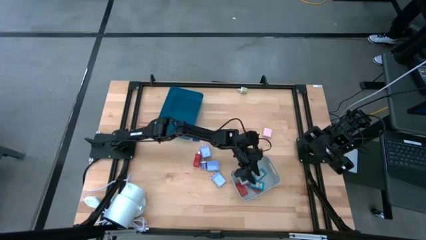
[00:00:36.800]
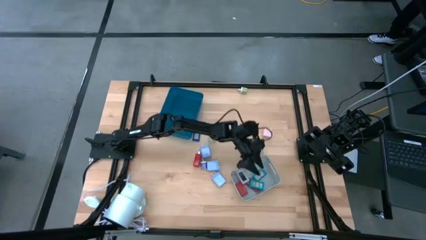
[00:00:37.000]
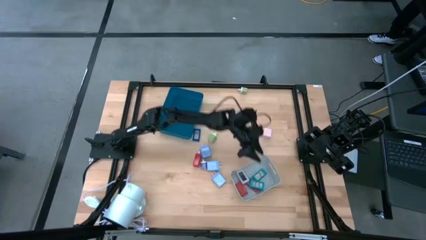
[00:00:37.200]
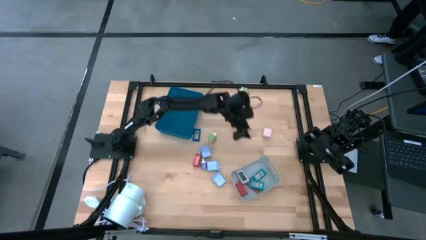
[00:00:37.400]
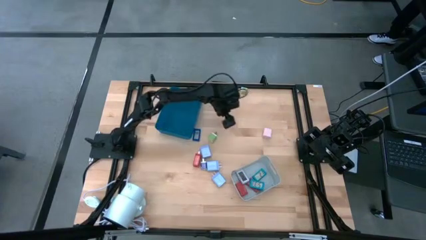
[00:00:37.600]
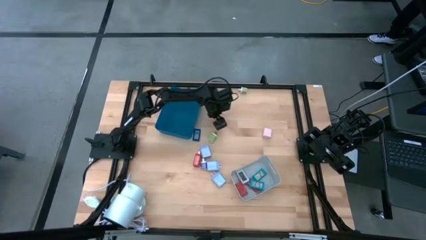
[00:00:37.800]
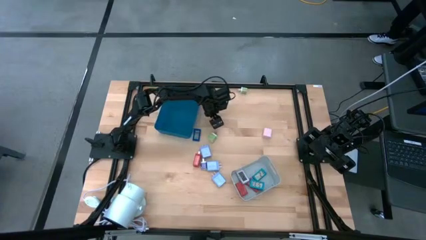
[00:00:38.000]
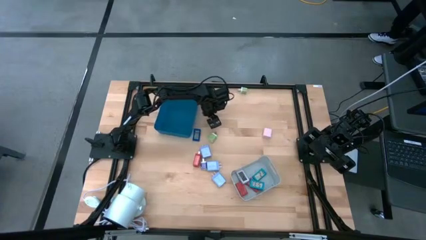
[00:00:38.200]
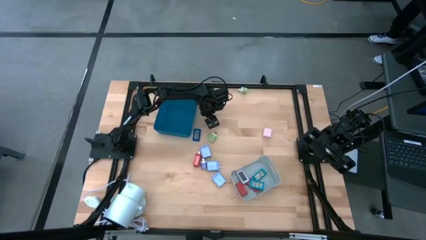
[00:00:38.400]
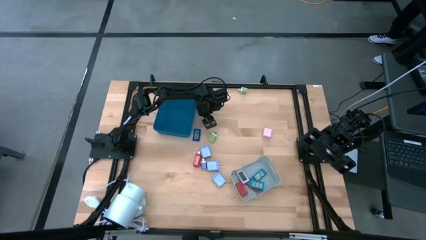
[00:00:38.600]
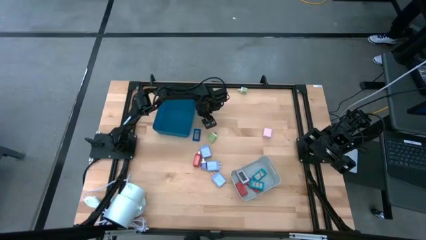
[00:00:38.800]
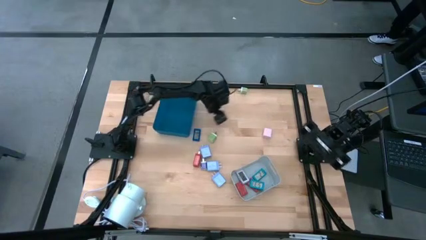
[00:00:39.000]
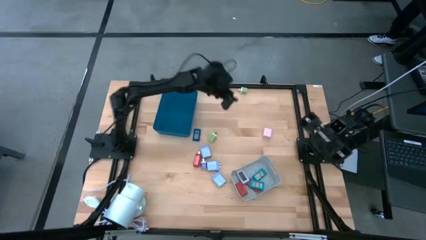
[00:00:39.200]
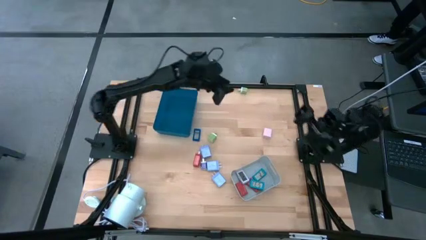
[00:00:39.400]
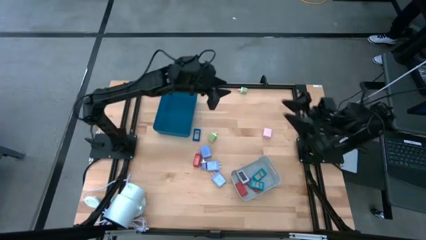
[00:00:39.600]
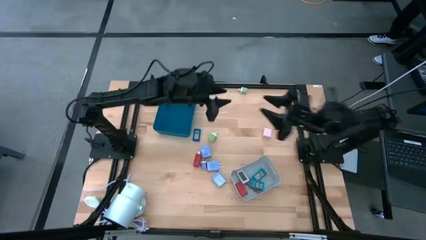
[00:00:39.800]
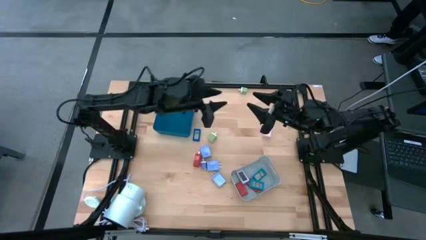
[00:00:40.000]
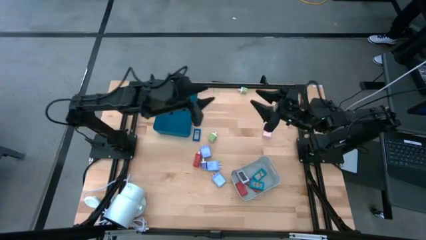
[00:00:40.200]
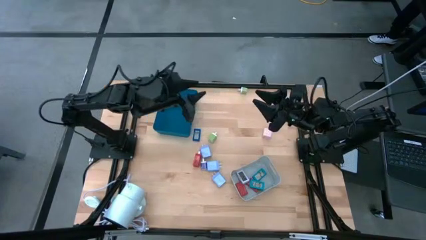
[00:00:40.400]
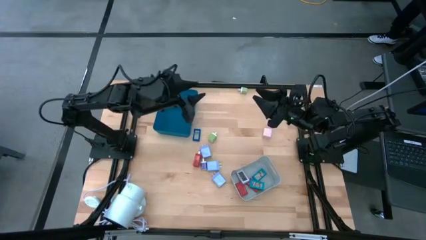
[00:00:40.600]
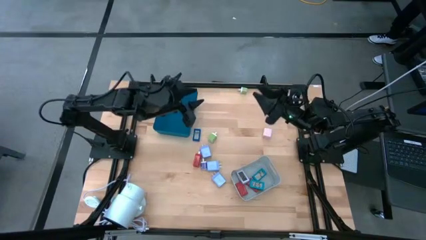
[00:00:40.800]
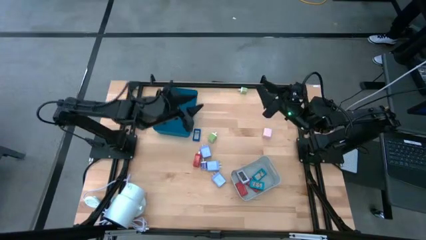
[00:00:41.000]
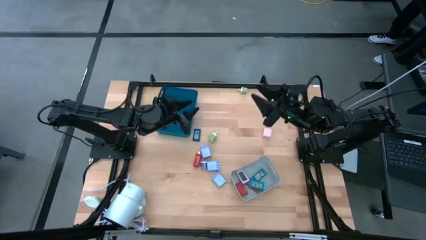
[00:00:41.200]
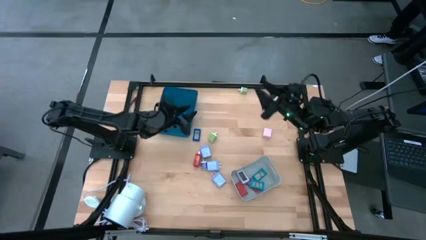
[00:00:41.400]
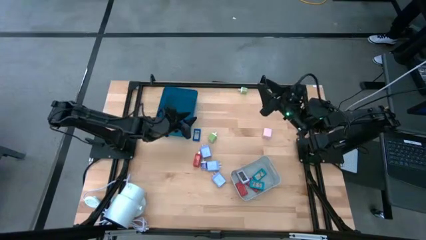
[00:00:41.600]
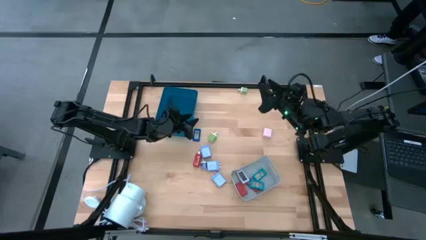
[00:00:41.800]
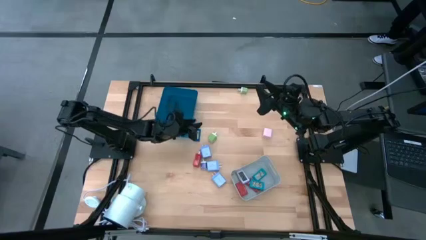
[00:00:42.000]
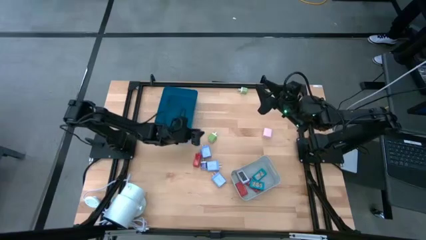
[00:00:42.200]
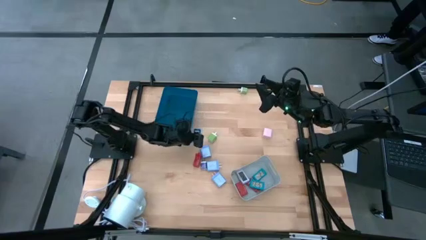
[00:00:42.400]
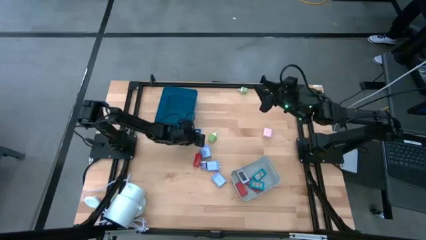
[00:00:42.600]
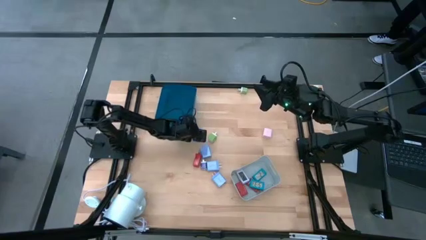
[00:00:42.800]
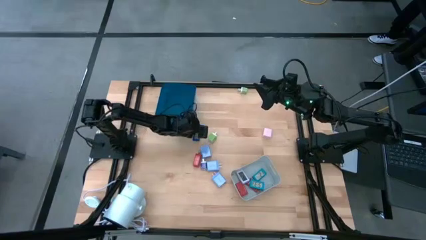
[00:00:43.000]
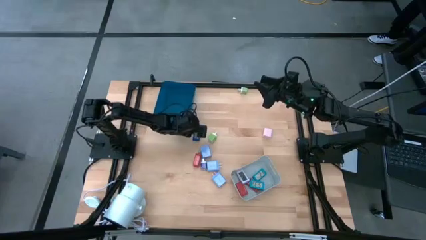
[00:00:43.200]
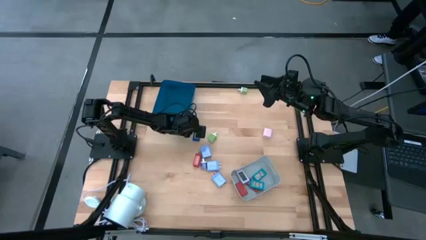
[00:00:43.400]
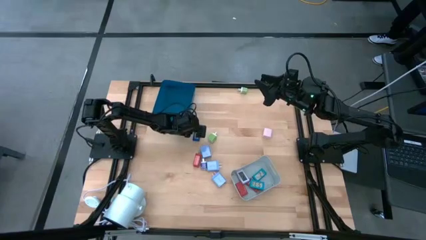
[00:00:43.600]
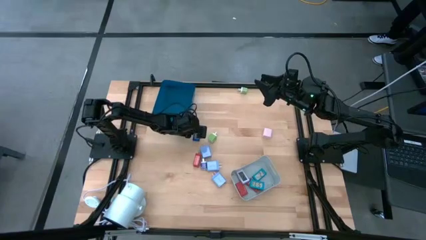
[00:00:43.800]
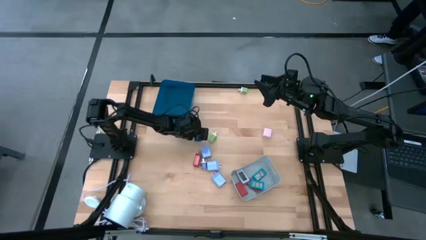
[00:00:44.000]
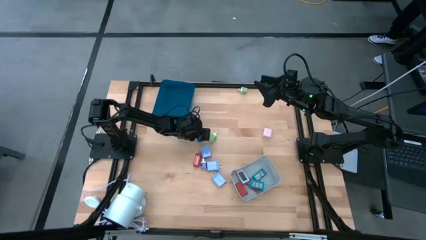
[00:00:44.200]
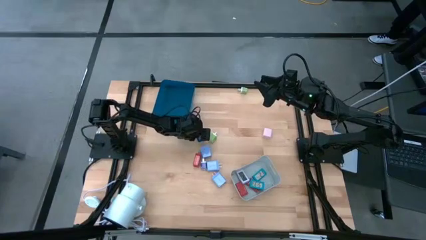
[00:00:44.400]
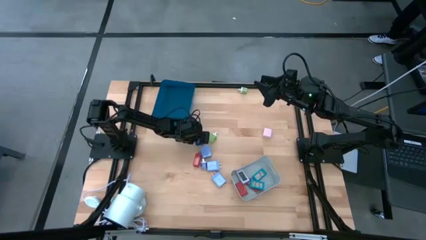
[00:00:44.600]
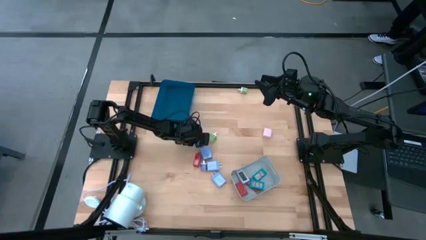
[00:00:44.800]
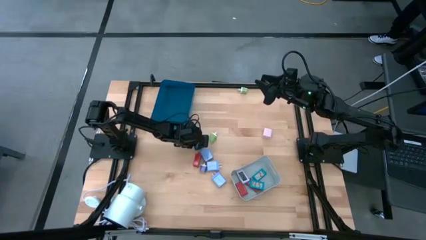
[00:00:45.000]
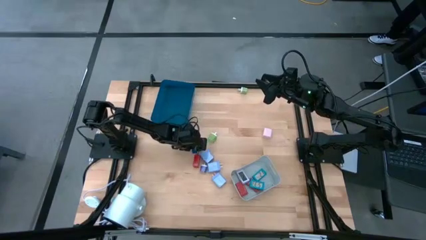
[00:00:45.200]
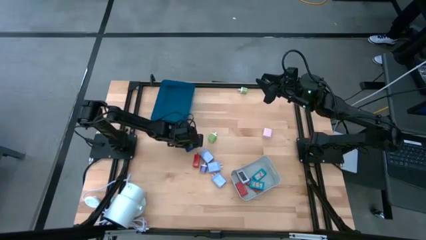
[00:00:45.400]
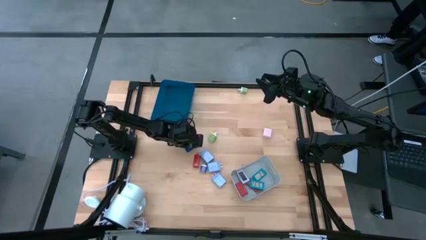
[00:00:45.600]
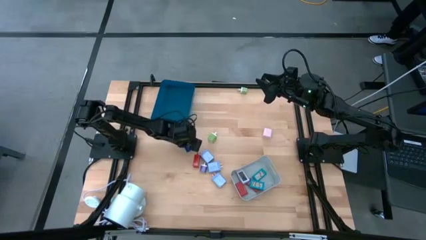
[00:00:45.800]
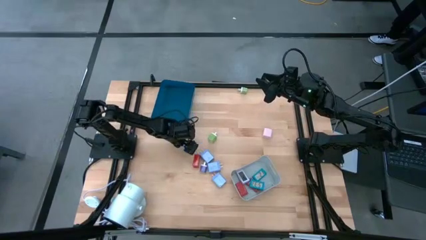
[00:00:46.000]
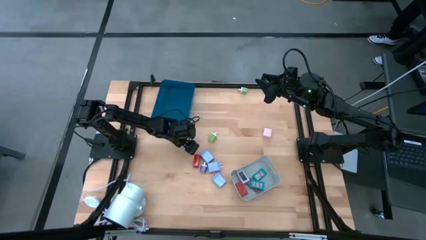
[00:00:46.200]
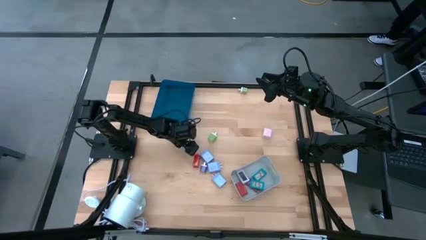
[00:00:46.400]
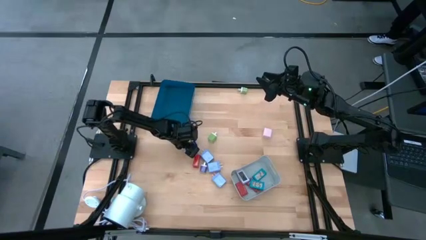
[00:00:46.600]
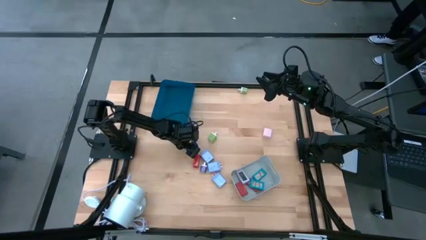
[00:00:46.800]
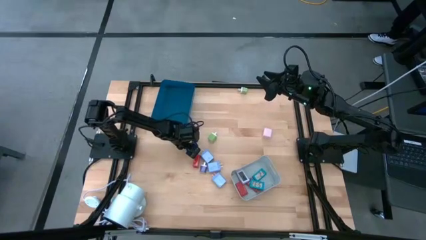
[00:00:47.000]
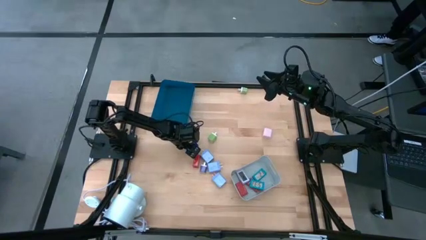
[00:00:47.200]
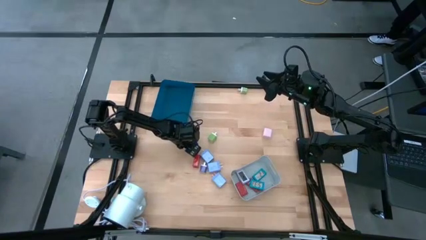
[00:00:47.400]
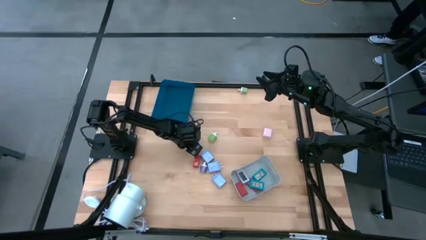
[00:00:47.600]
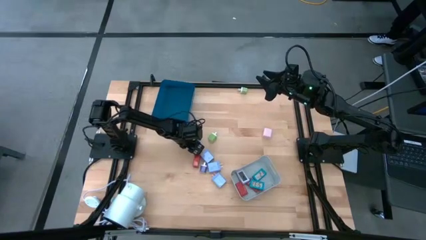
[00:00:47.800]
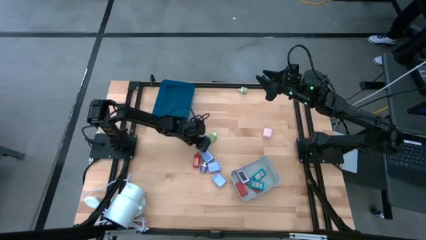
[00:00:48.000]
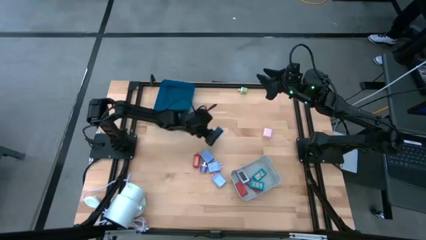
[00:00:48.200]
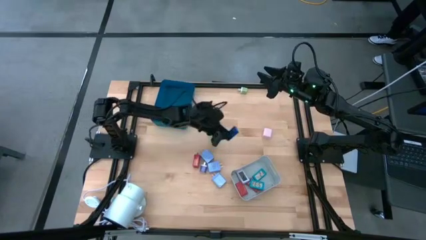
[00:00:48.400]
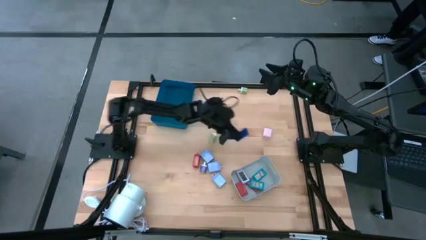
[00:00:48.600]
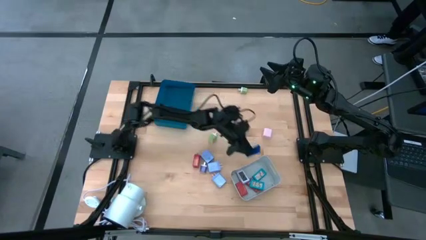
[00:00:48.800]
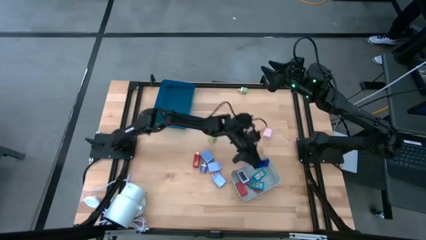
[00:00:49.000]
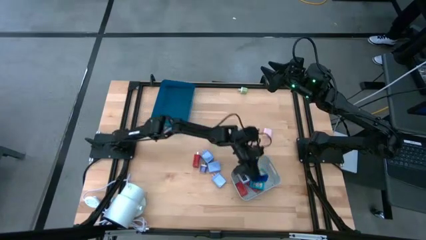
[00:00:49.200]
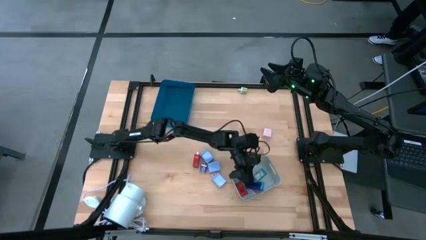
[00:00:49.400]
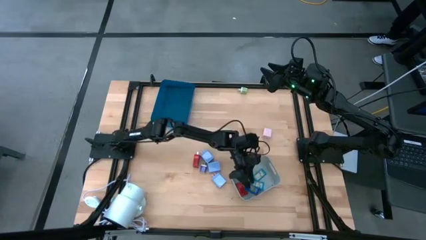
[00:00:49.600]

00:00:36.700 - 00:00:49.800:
Task: Pick & Place Office items
Put the blue digital clock into the gray bin

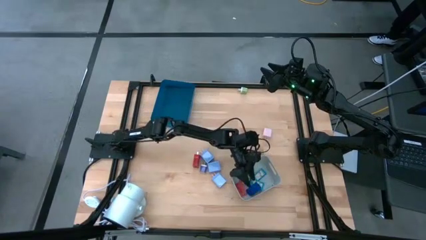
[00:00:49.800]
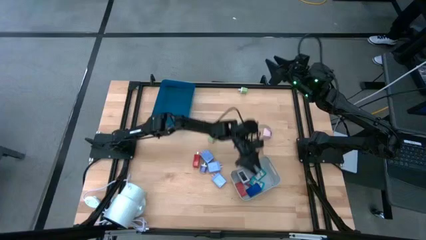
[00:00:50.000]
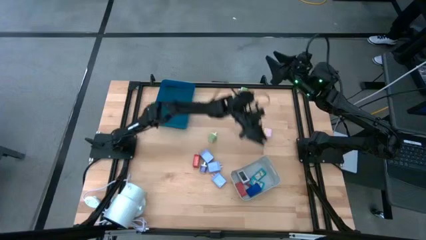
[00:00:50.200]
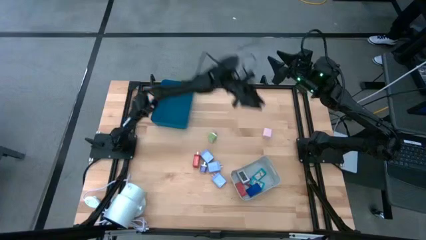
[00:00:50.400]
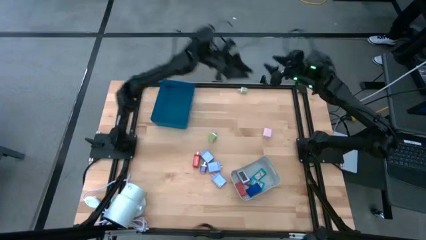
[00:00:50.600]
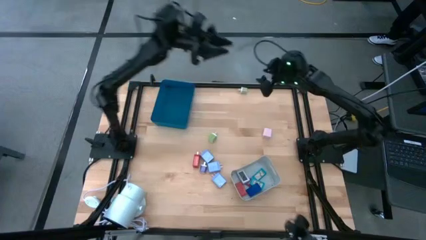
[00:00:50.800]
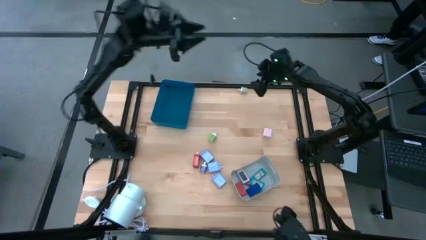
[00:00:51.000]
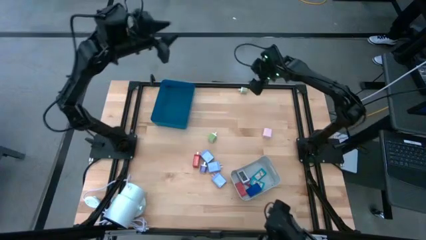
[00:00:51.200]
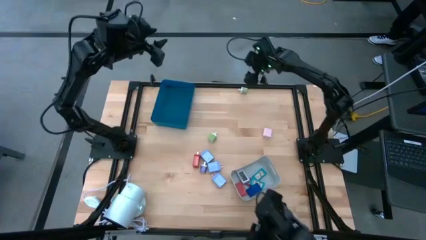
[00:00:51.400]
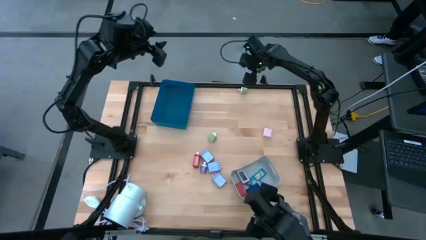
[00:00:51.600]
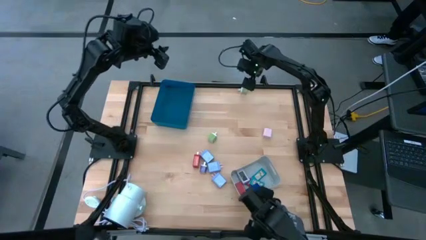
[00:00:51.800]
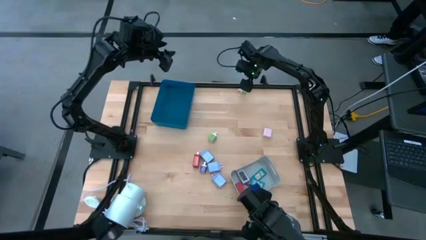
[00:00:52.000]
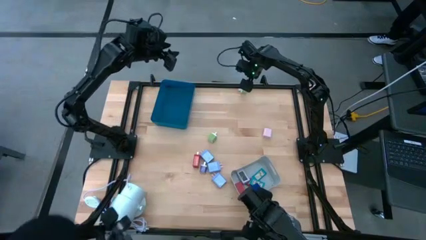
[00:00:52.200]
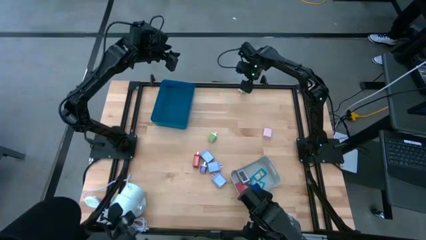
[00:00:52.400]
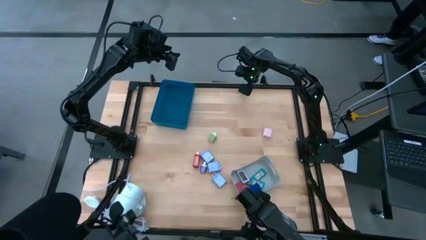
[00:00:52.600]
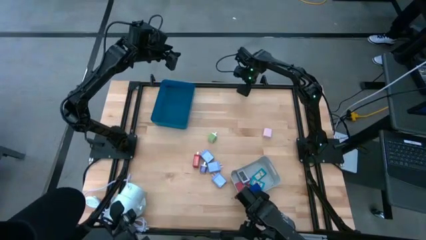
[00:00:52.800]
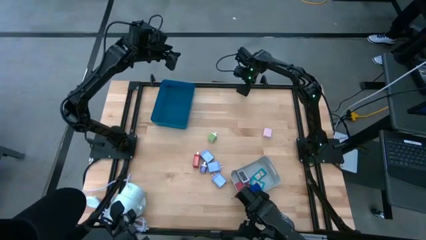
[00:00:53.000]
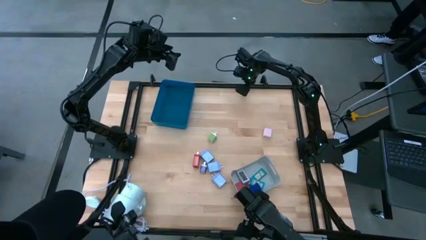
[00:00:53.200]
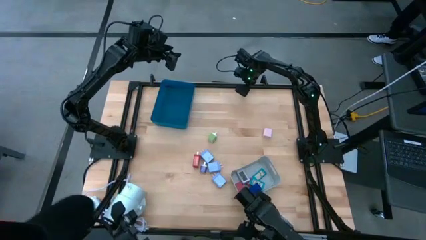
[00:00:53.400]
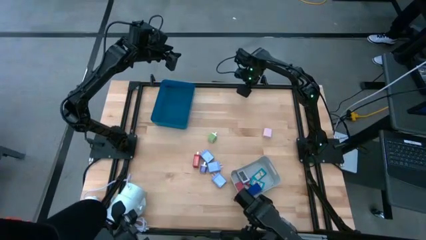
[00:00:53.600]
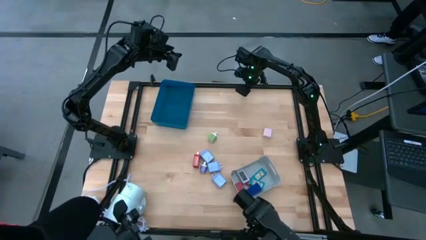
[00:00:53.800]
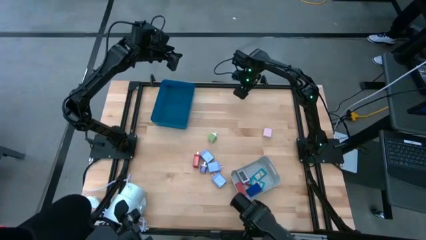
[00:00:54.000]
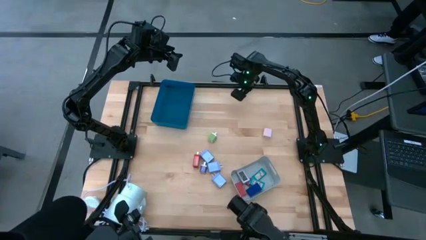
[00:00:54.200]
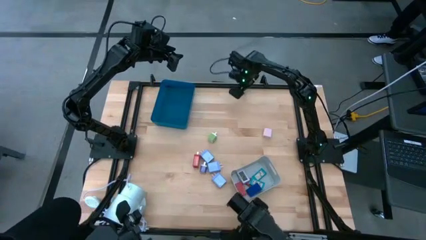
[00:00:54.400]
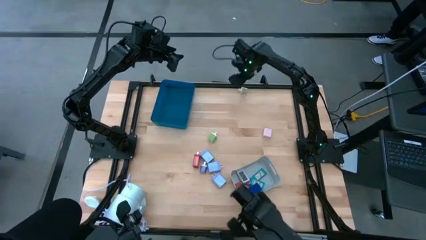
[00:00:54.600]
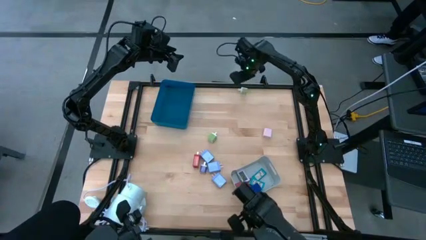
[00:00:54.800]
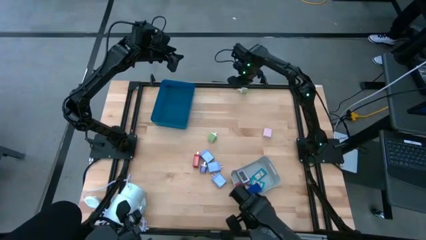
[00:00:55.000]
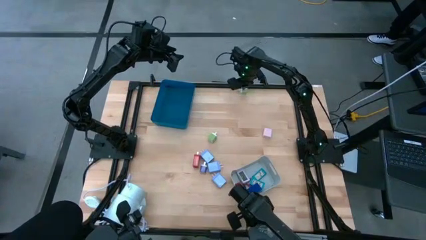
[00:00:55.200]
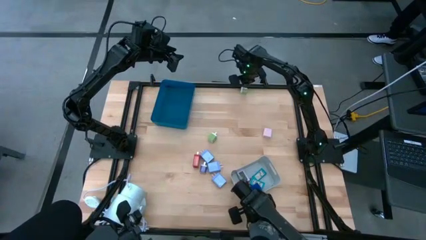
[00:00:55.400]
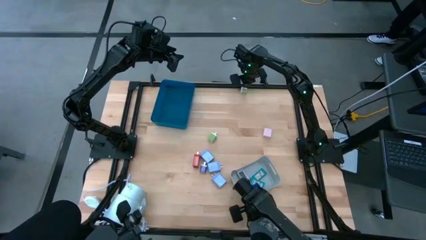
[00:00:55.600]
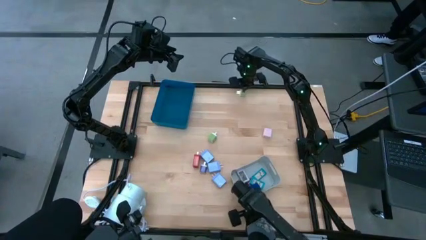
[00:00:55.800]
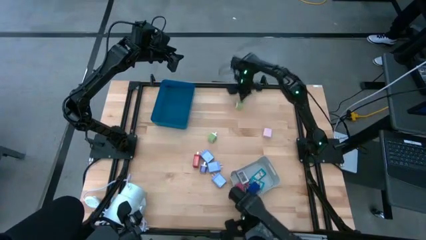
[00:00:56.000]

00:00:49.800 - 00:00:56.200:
Move the top green charger adapter to the center of the table
